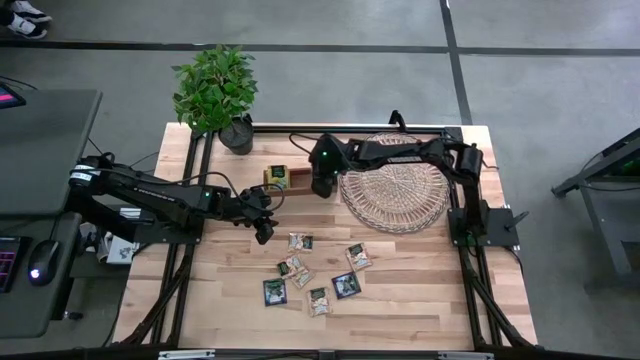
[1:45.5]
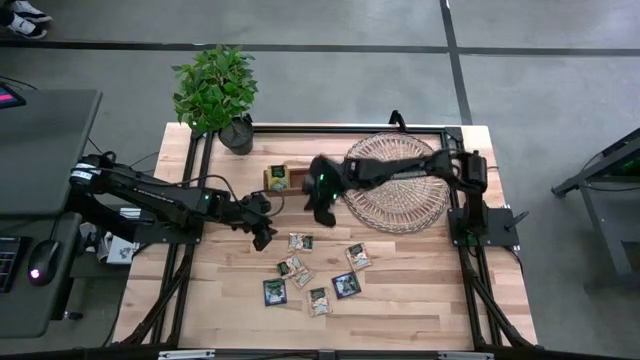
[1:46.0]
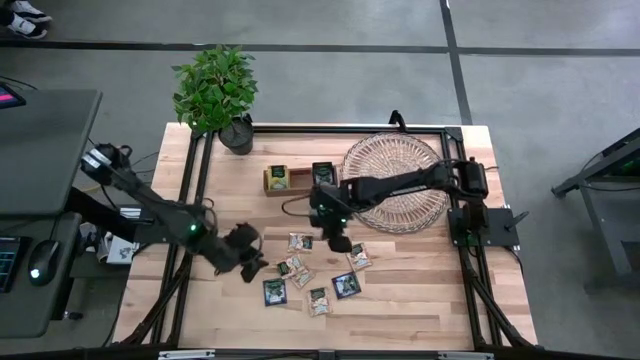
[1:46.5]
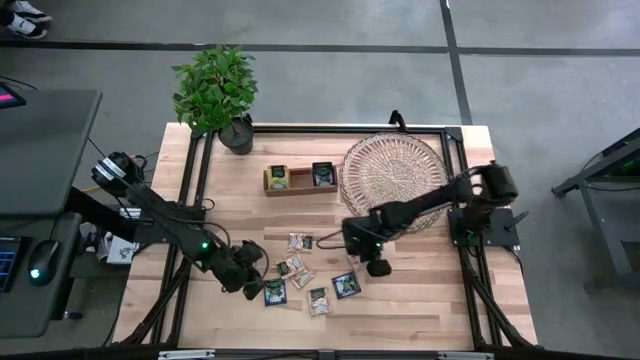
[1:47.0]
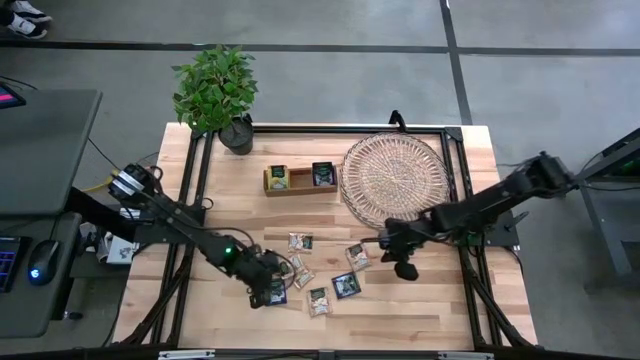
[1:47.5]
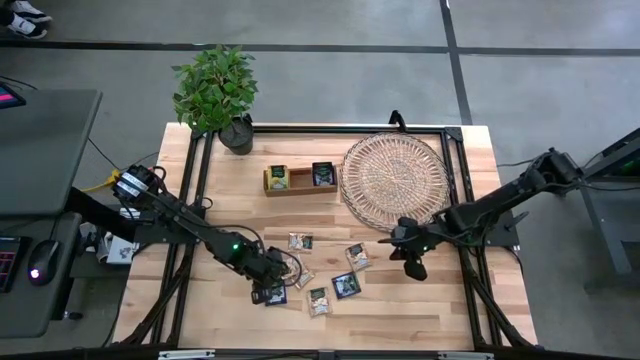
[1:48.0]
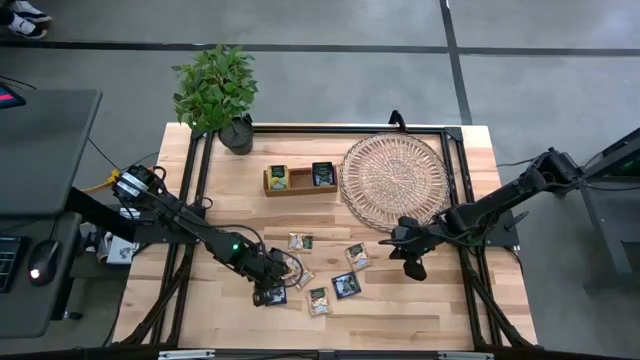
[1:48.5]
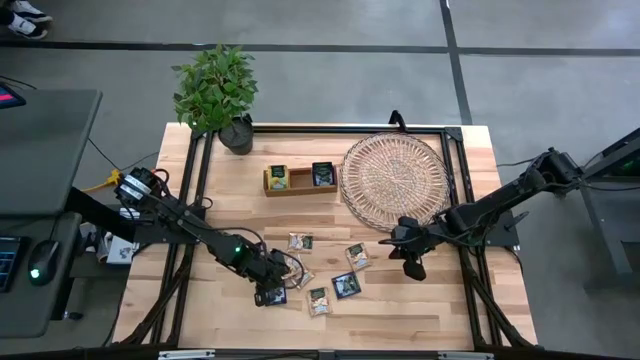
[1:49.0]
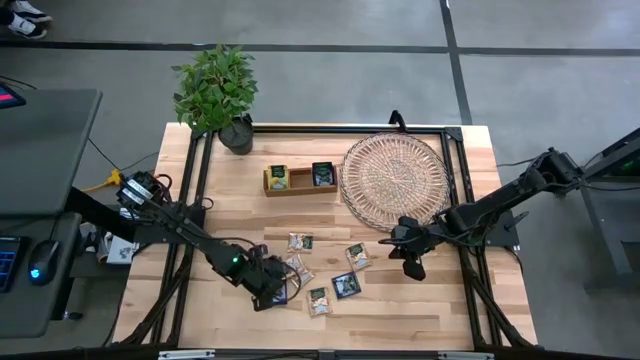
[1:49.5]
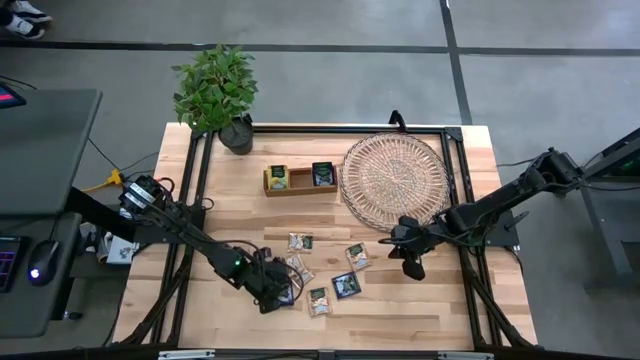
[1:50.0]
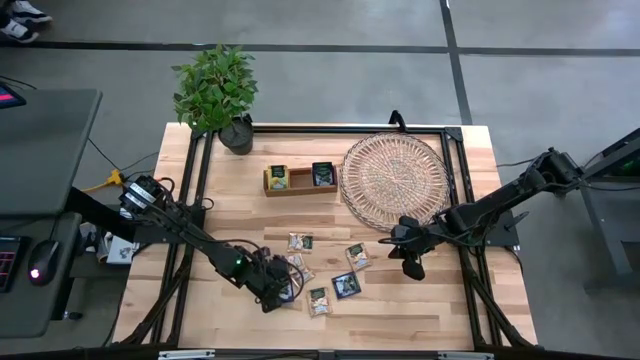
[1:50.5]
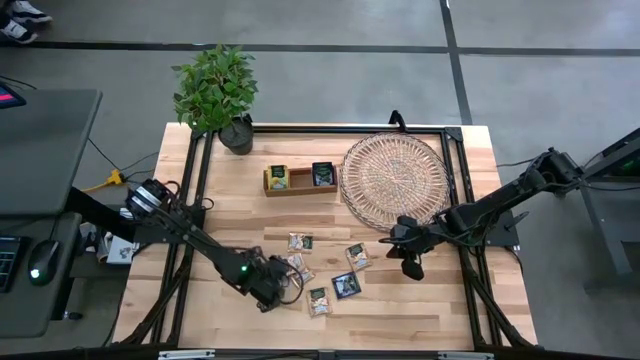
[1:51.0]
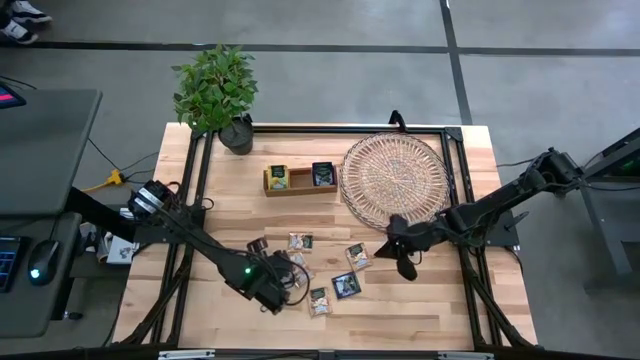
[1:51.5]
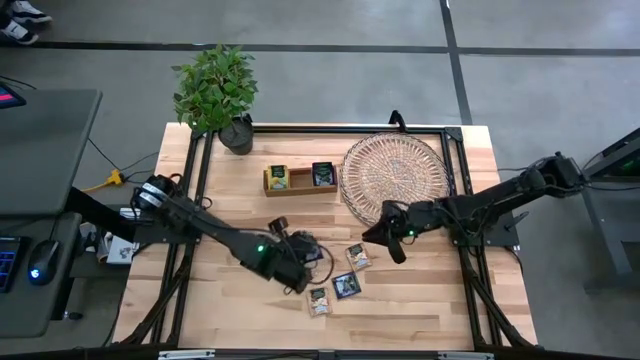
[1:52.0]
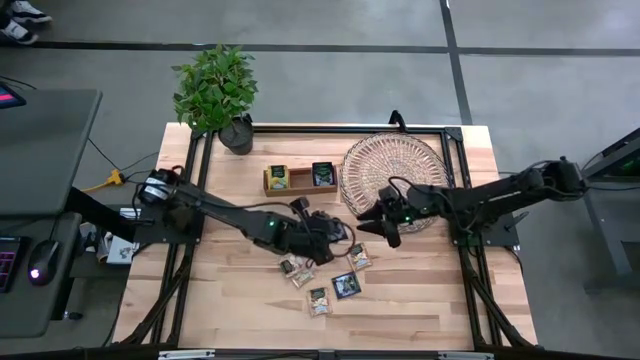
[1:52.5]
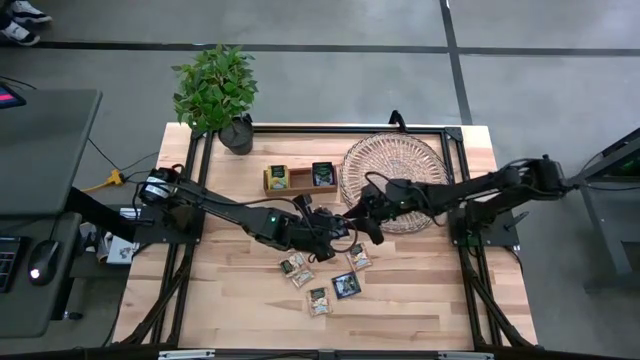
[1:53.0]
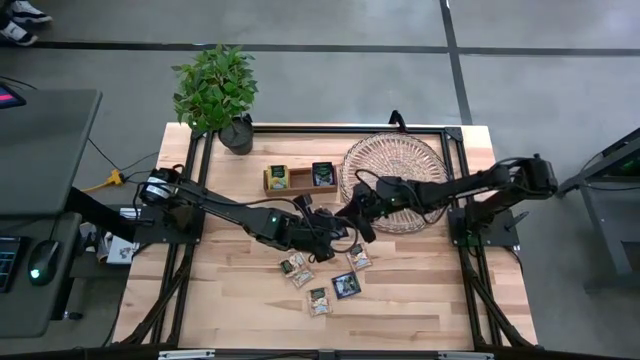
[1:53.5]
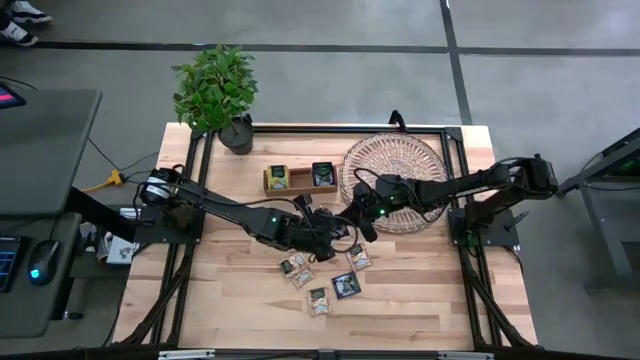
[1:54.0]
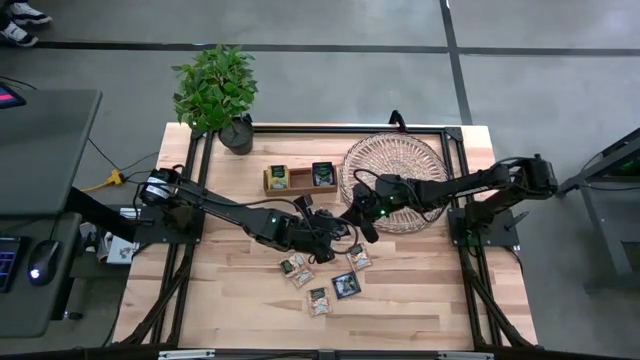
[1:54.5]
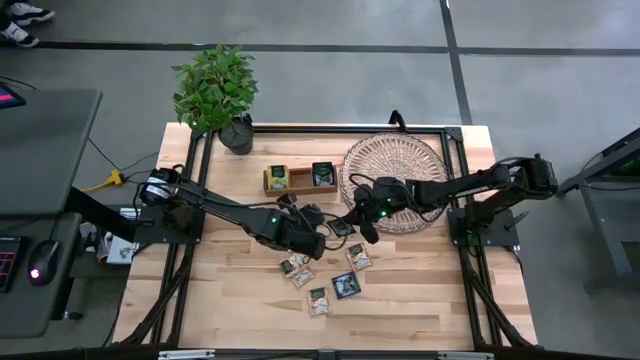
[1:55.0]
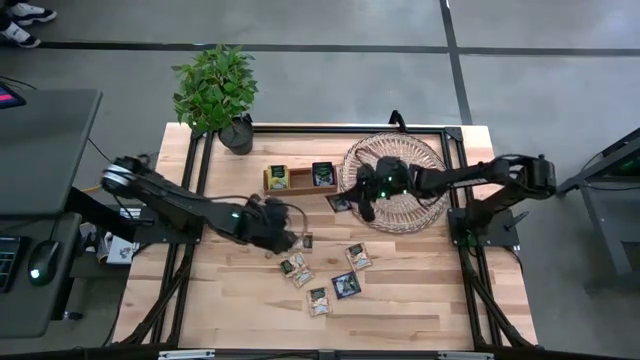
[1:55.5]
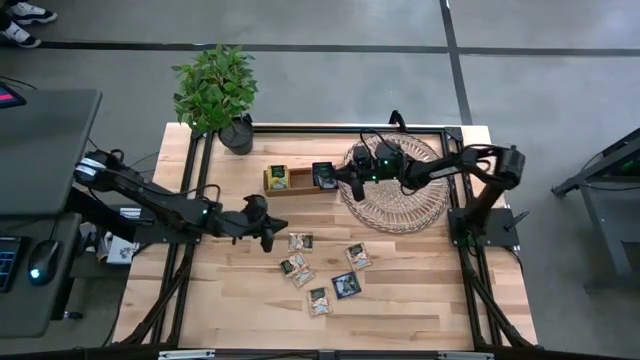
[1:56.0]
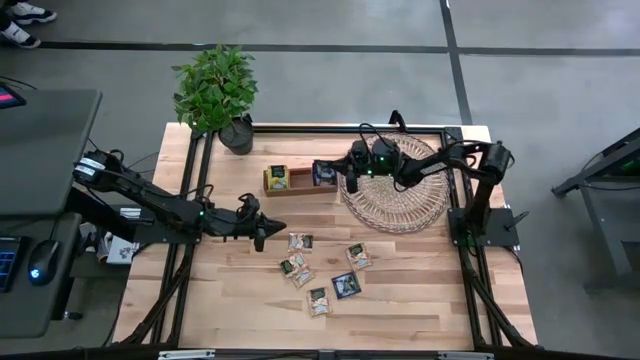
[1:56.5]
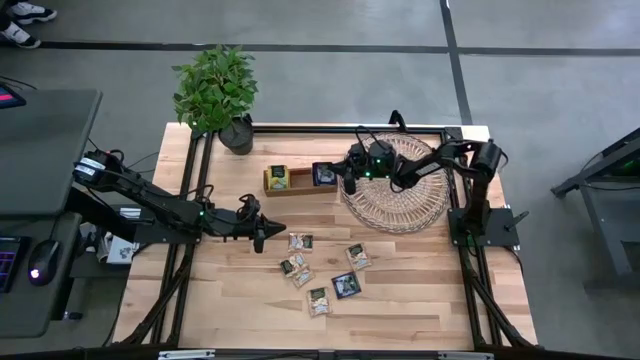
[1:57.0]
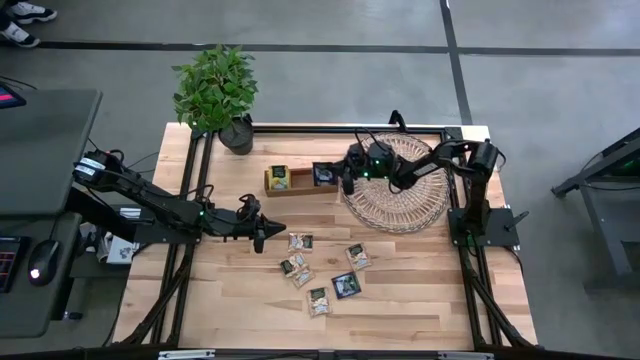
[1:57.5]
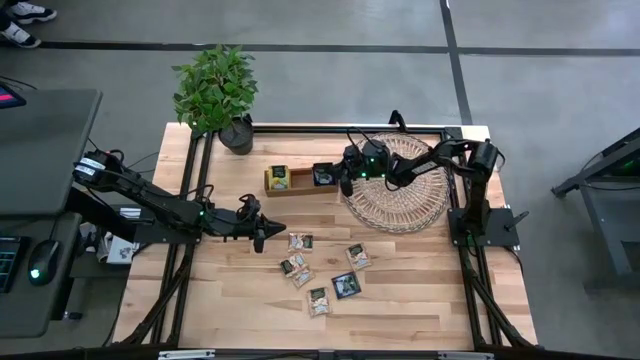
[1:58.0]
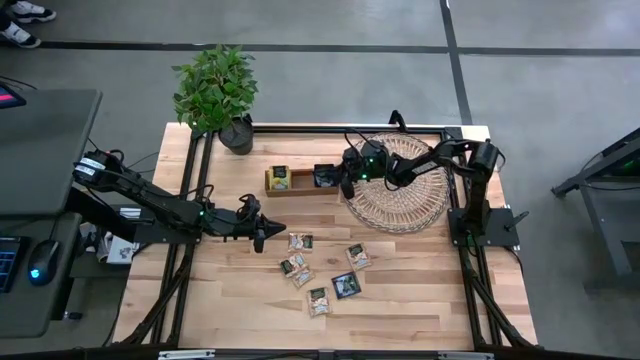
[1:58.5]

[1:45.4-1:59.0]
Task: Pick & Place Tea
Put the blue tea bag into the right section of the wooden organizer

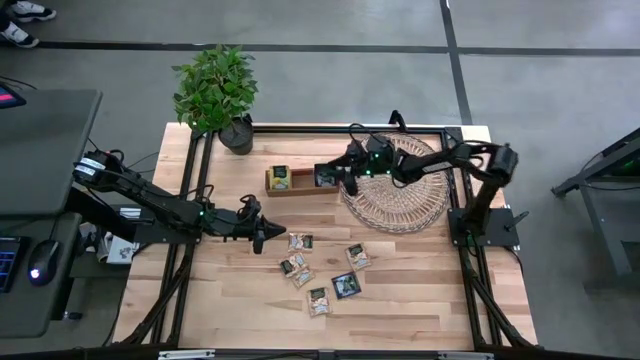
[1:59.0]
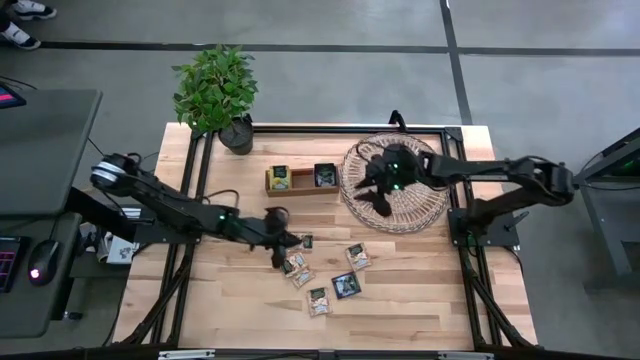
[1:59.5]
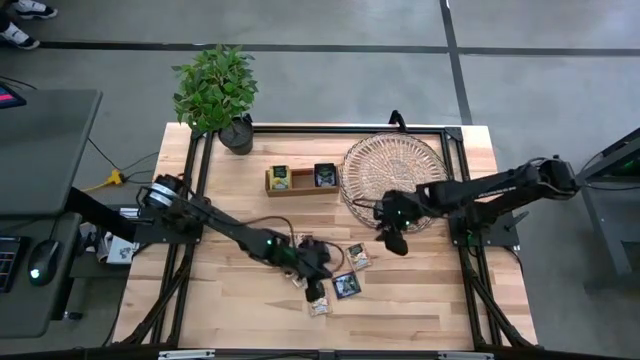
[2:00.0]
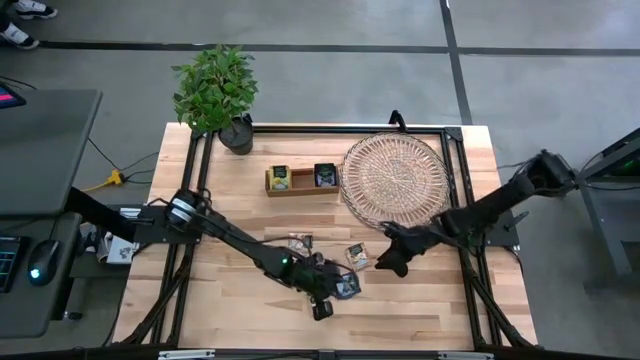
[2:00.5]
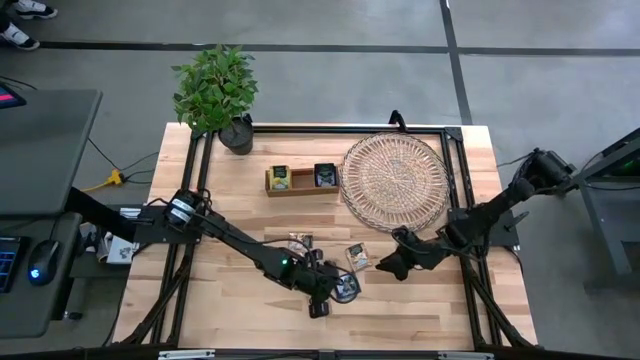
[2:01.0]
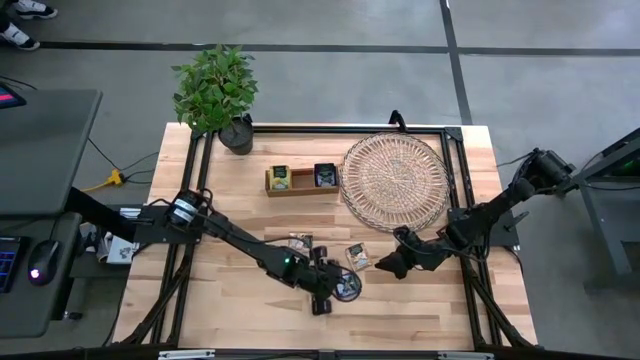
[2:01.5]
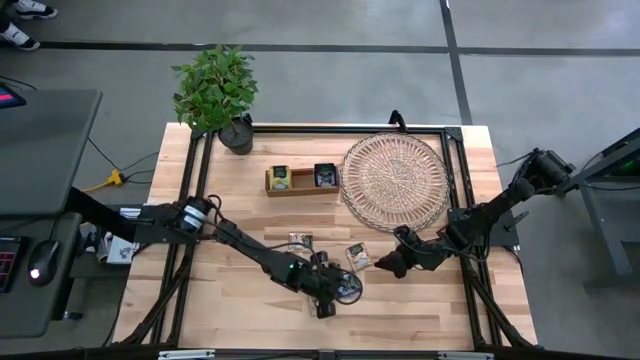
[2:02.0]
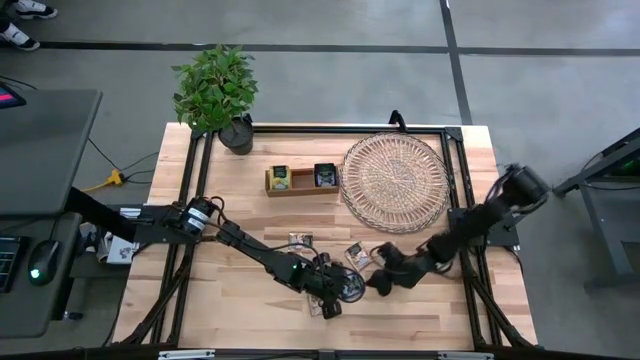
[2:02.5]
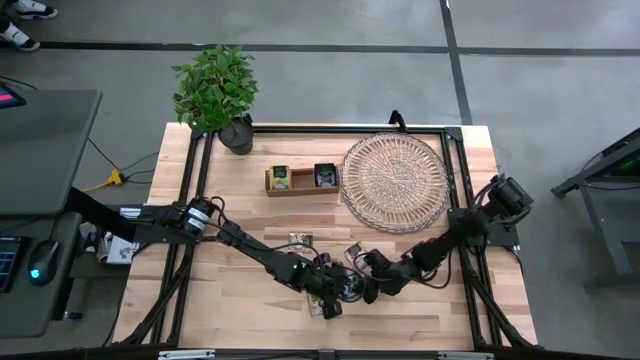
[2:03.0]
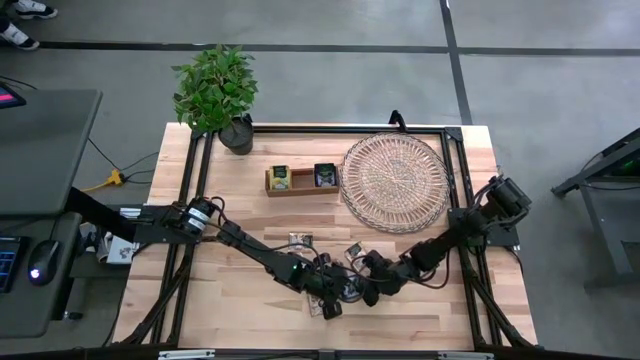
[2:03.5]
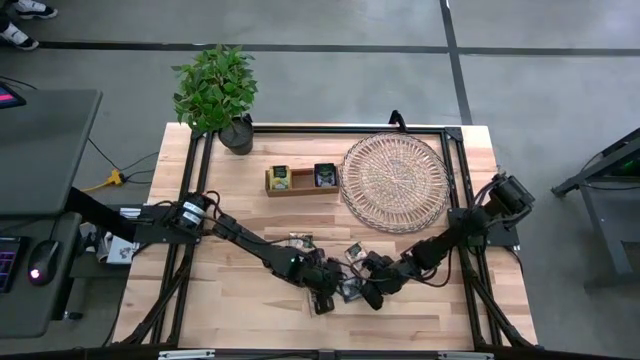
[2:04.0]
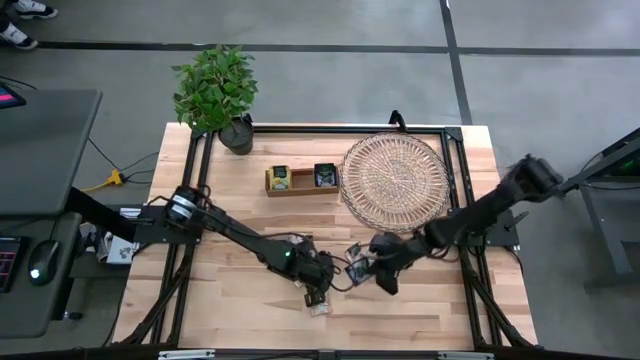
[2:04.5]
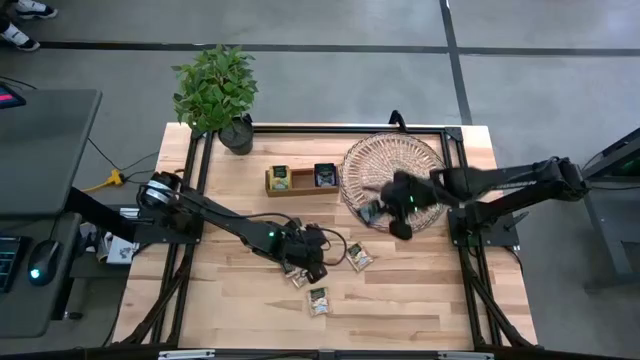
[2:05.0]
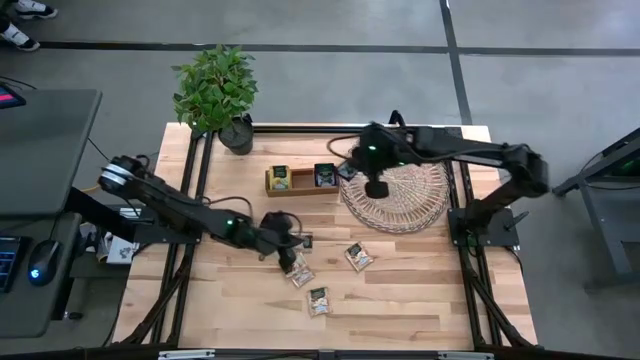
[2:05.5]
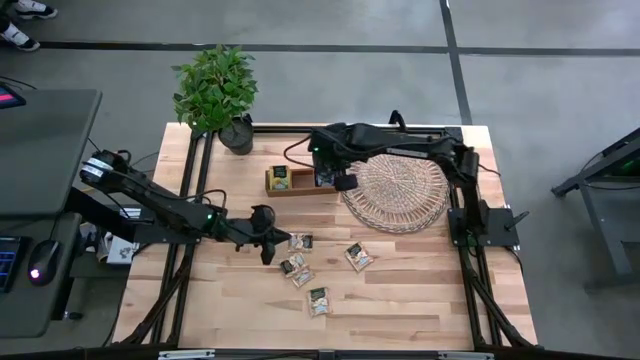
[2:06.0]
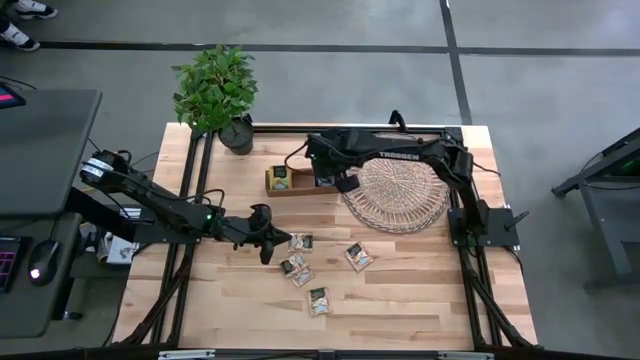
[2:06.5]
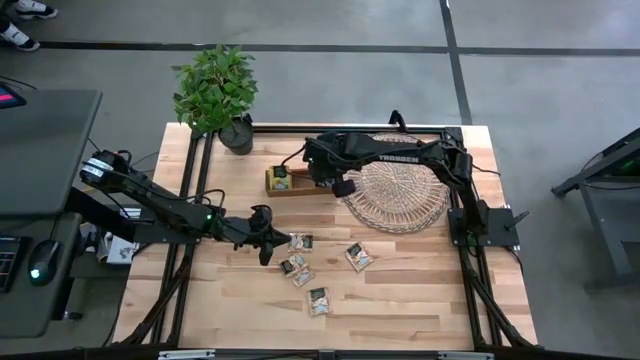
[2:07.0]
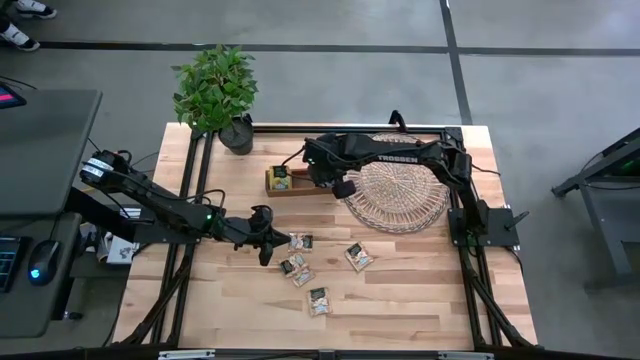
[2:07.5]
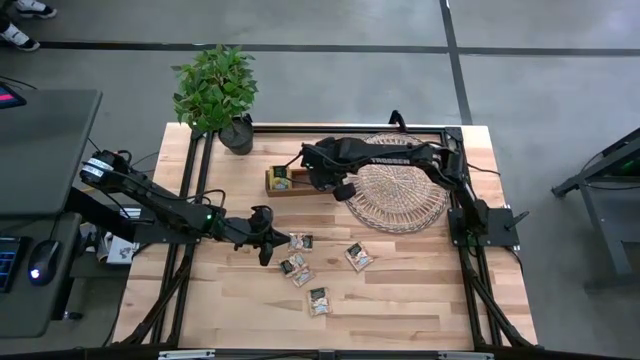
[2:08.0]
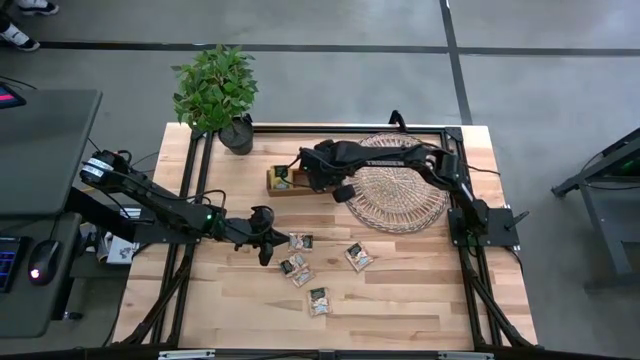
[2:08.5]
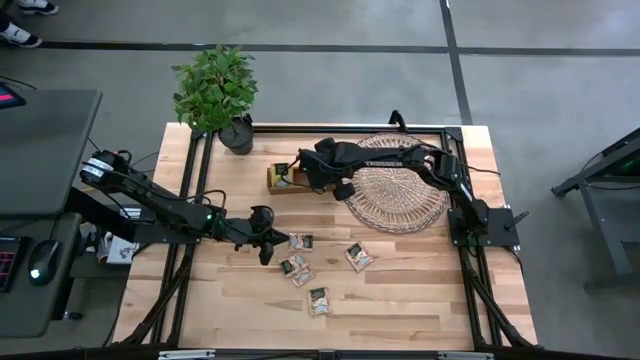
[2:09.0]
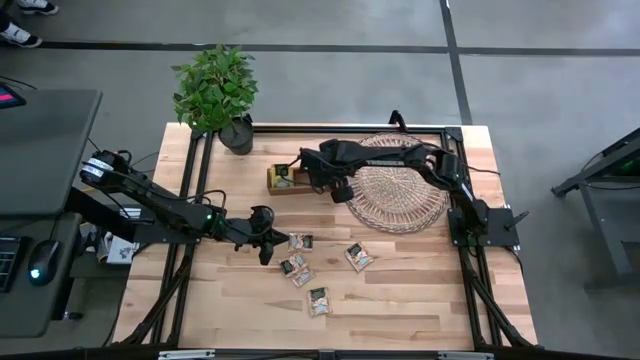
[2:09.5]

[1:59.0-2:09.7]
Put the blue tea bag into the right section of the wooden organizer
